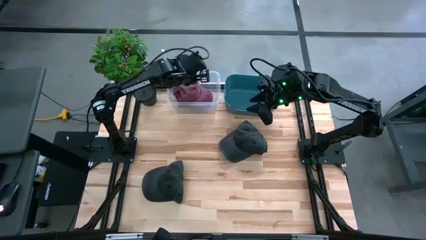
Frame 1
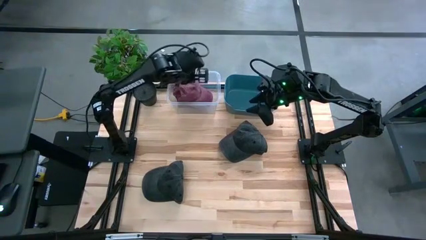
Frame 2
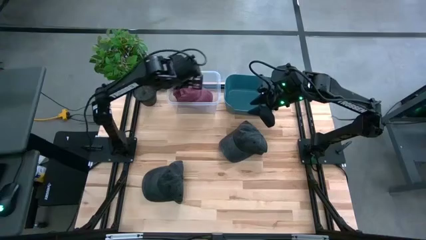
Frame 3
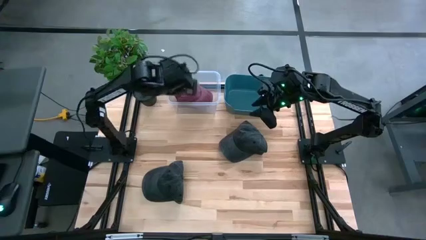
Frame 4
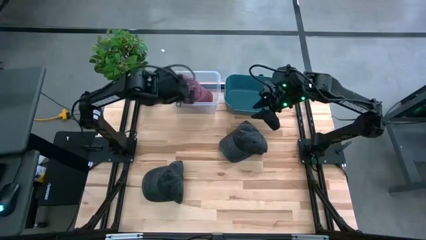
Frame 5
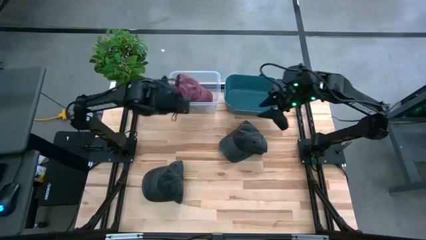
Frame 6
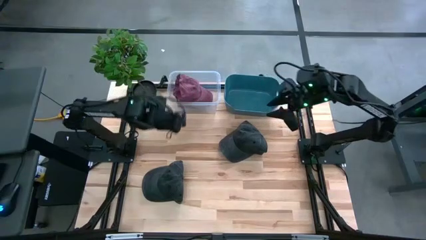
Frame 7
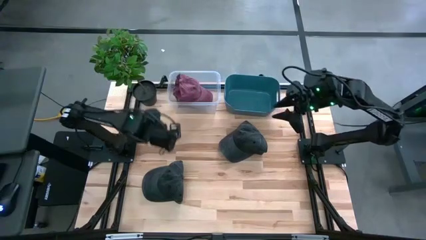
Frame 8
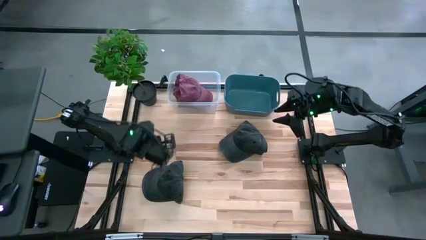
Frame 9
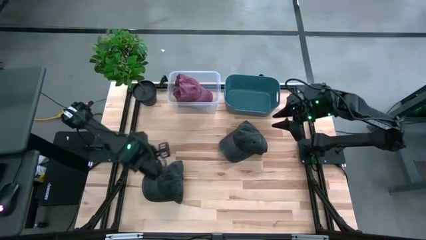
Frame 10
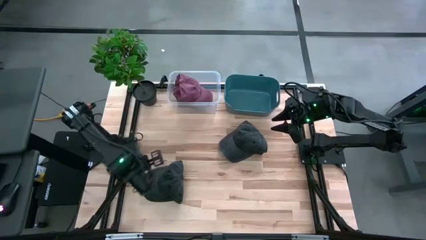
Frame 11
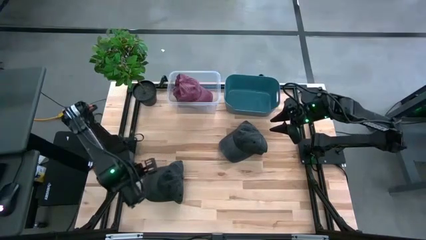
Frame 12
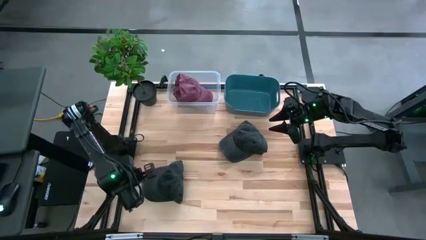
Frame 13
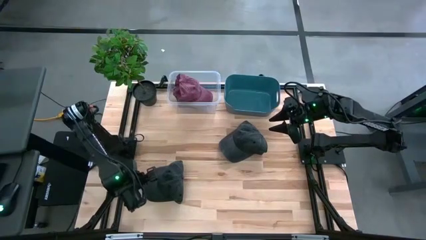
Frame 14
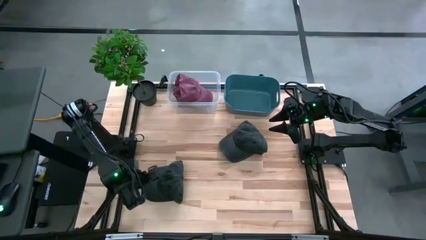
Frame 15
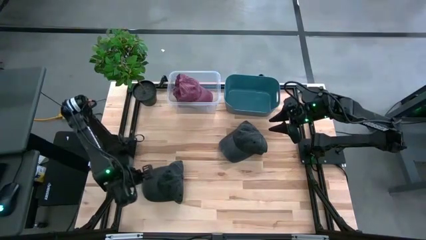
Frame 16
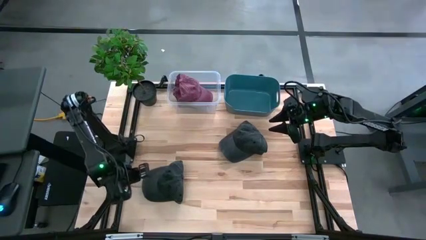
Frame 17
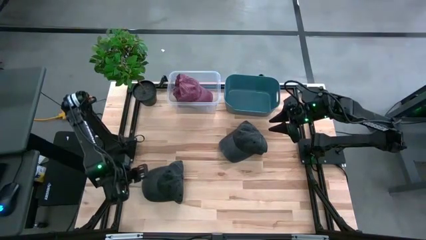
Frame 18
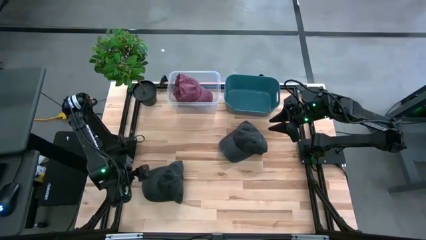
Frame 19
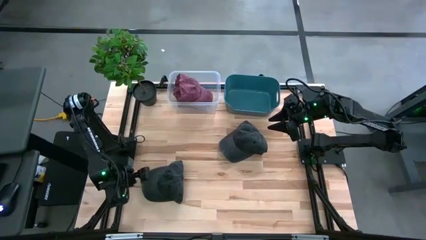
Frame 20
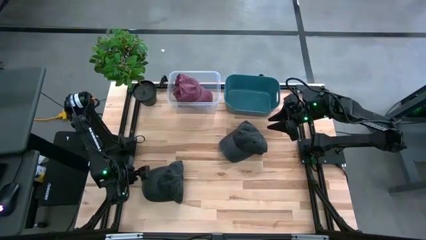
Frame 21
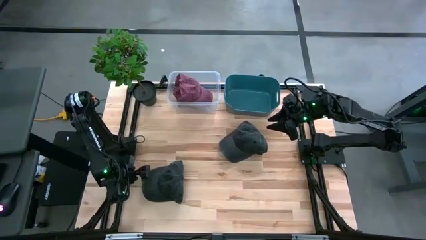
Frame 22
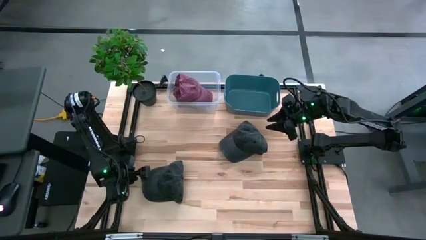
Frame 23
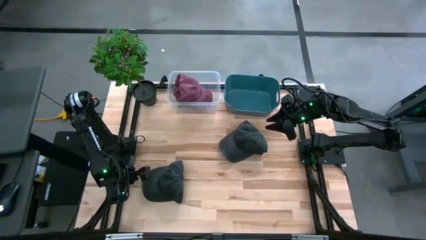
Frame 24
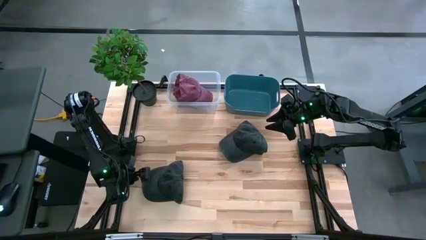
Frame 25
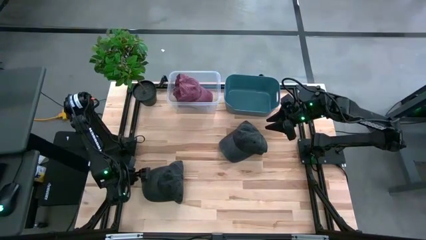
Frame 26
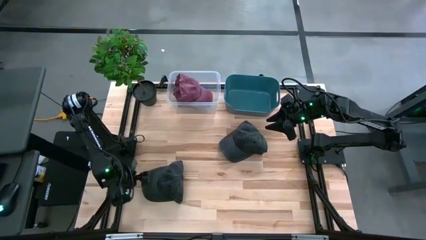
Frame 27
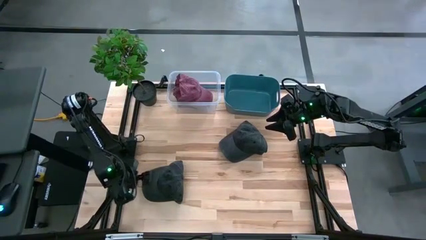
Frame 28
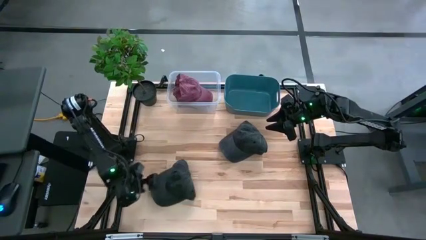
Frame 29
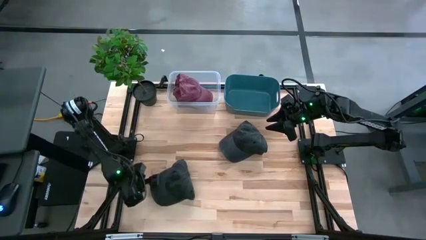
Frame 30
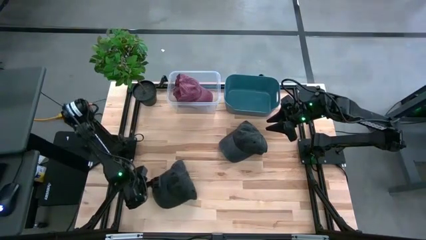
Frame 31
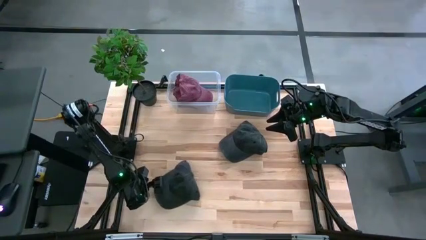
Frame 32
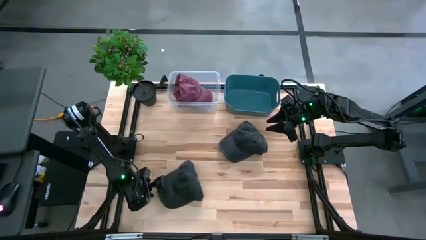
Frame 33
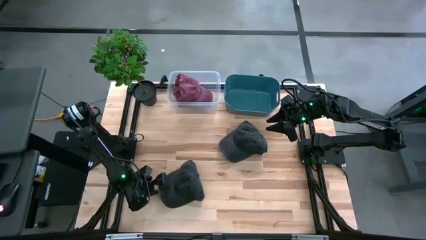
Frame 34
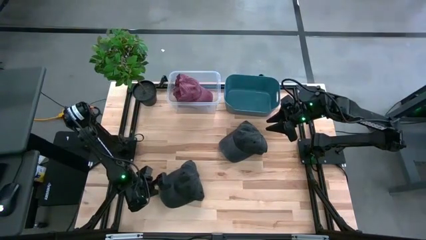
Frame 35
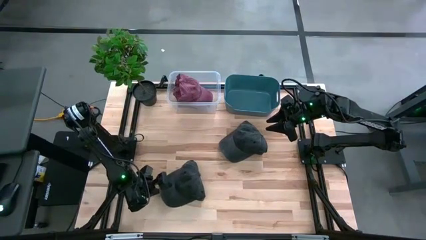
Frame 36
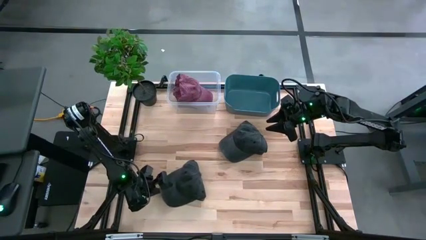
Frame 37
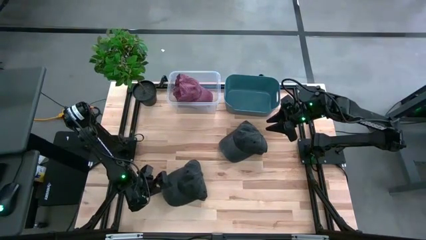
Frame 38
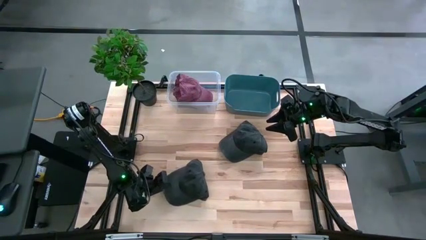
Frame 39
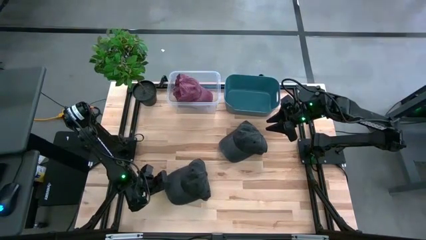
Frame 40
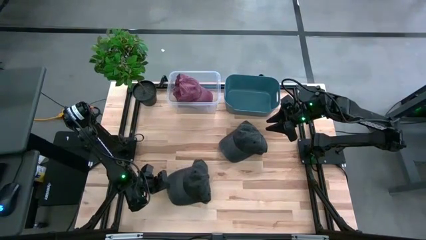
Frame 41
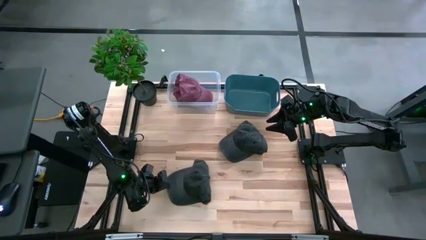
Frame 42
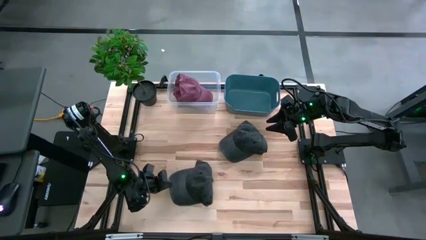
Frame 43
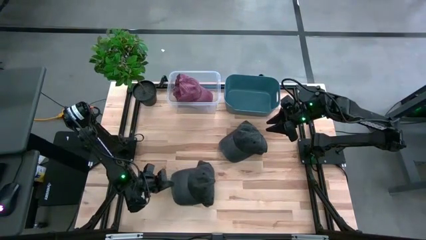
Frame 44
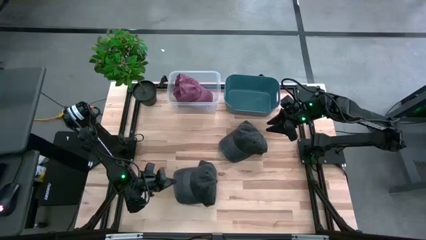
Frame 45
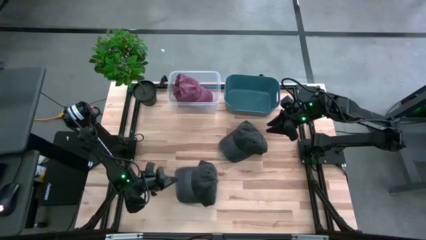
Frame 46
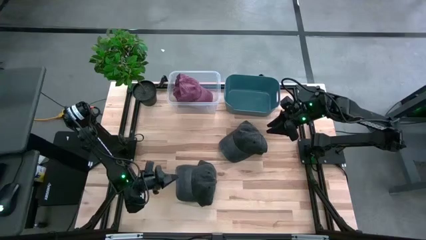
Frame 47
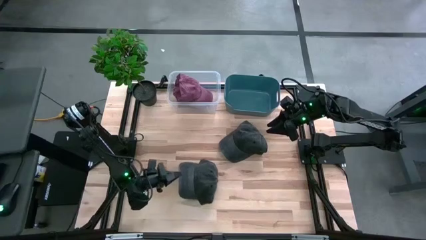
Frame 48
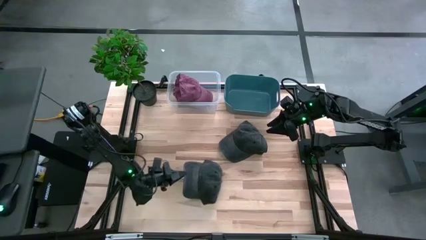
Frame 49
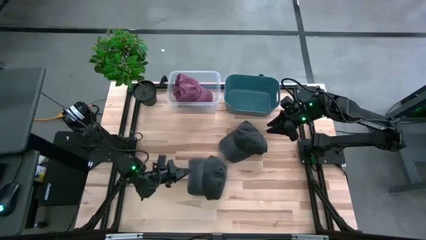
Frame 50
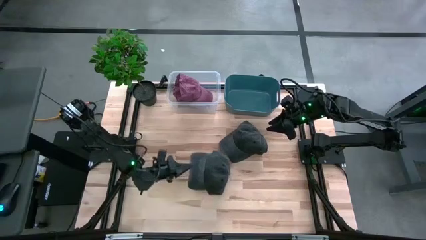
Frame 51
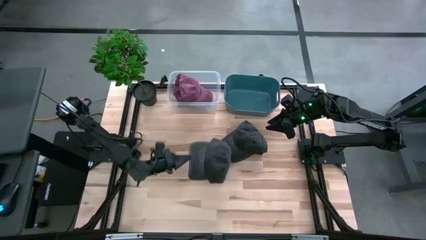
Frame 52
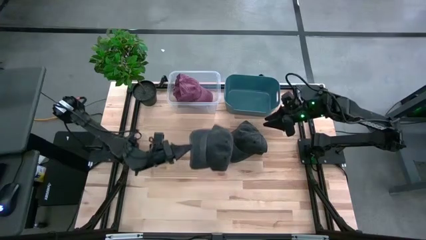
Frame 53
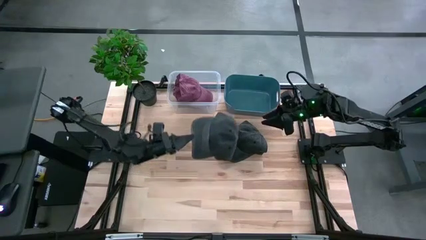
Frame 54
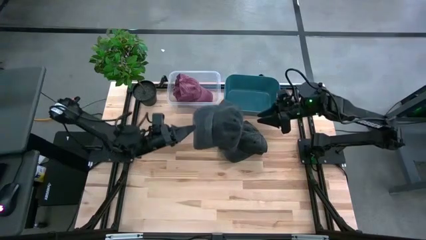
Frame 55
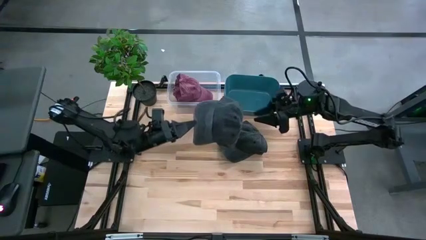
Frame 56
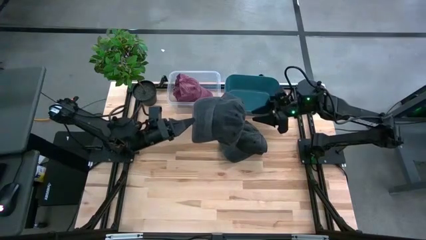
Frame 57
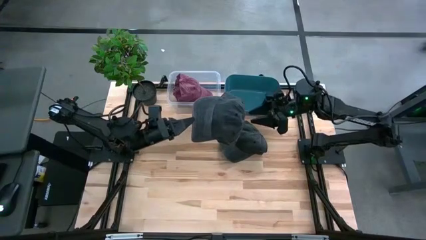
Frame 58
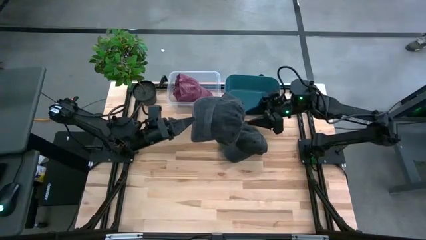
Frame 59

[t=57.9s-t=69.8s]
Task: Pick & Place hat
Put the bottom black cap into the blue bin

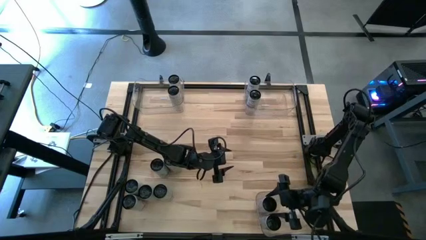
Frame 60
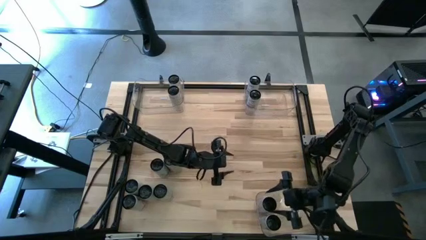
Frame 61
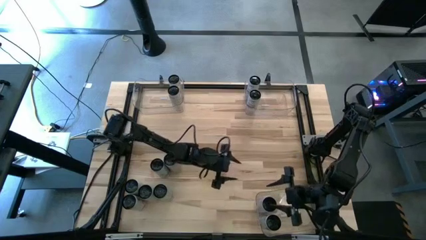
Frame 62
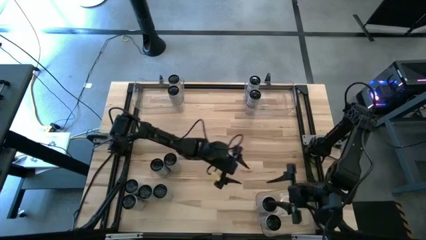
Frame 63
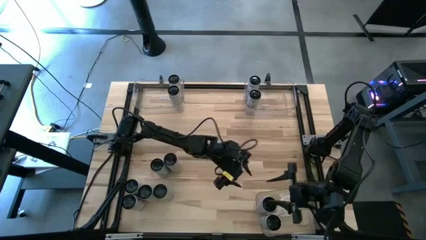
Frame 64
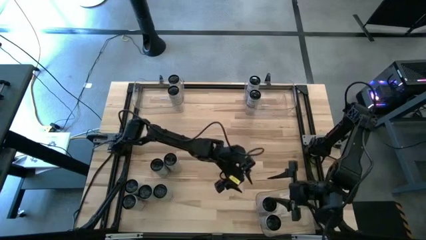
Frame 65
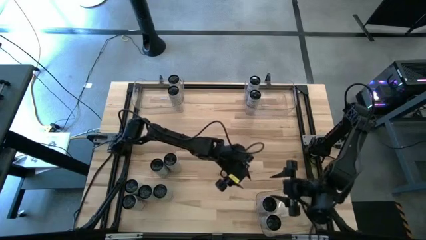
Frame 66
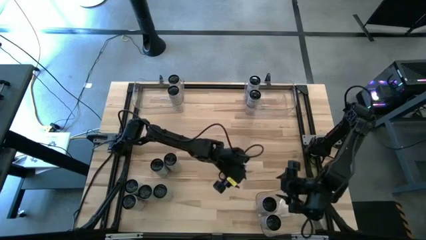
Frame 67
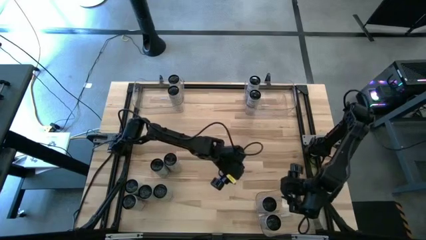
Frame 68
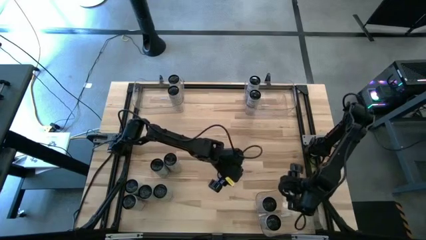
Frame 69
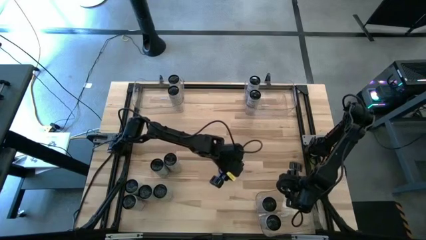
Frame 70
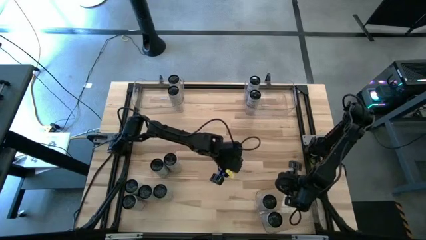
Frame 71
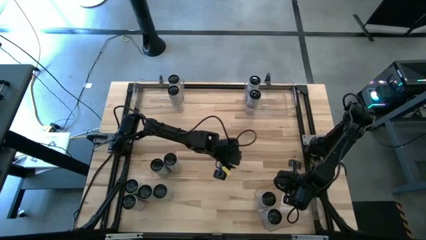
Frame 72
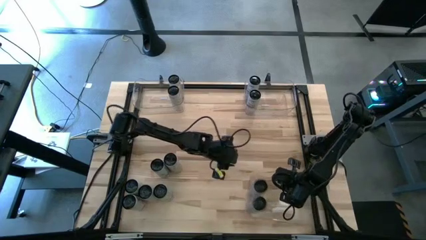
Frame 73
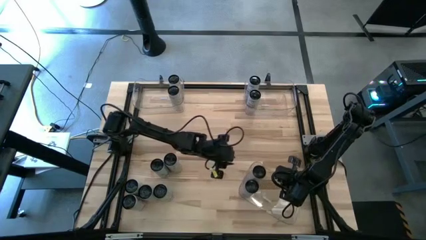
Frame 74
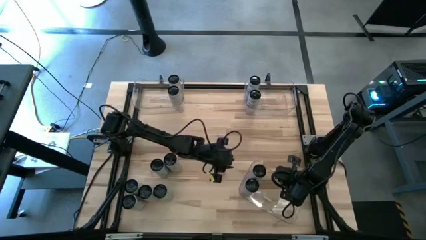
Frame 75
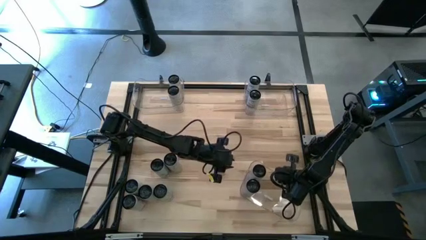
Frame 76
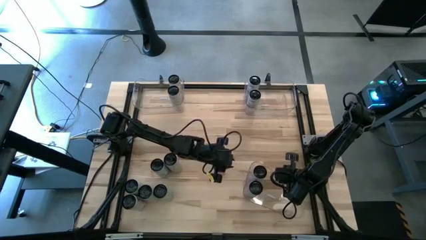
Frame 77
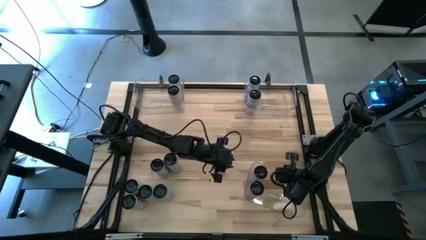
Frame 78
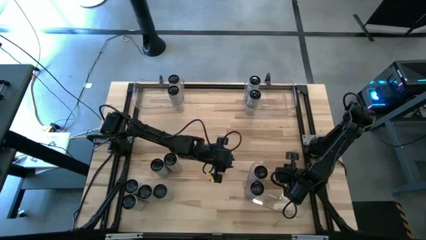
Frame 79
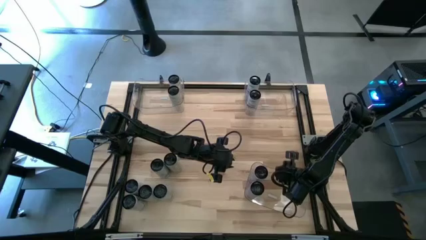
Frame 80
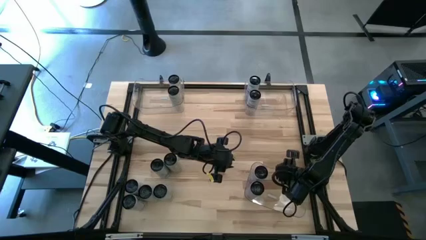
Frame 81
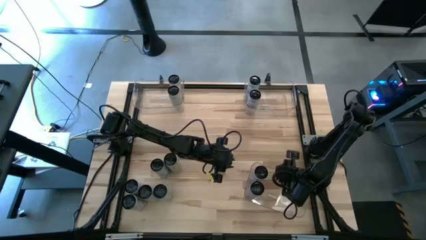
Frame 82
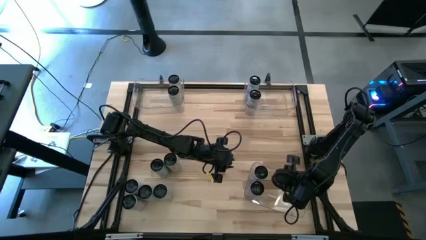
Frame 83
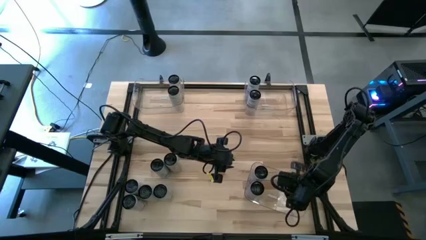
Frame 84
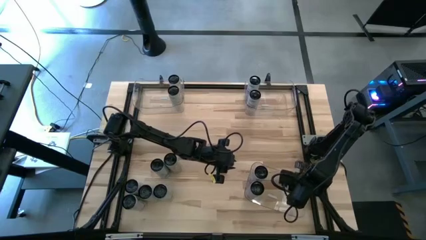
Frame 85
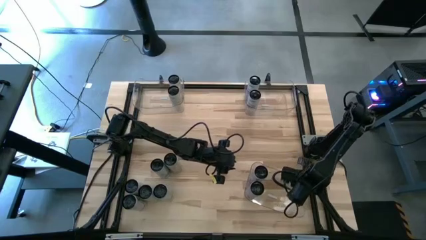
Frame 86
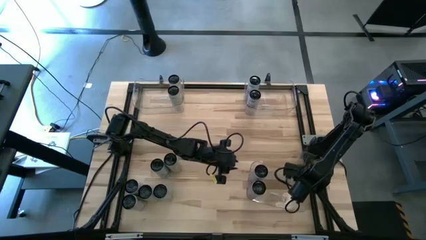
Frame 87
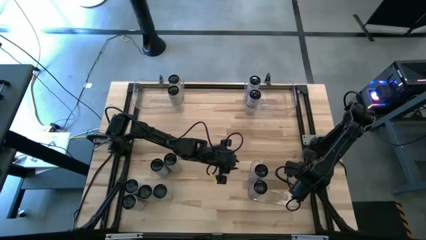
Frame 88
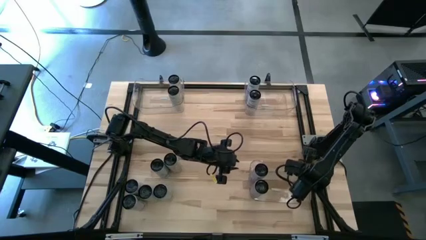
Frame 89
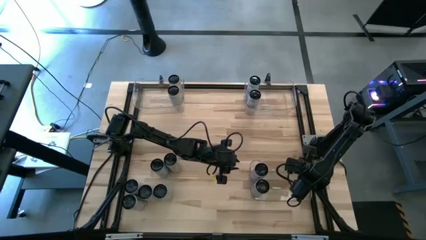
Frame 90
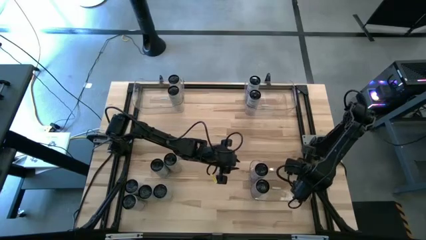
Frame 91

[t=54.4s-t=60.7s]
Task: Sort soda cans
Adjust the bottom right transparent bin
